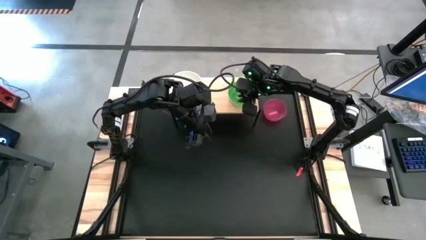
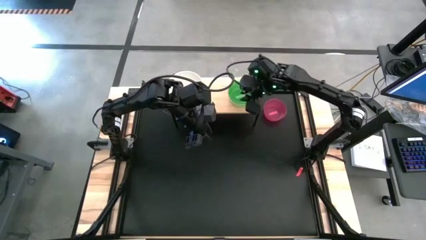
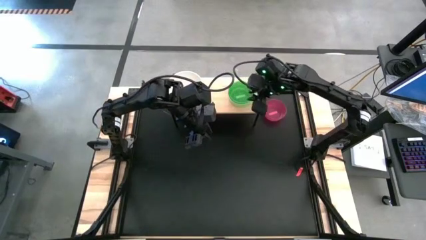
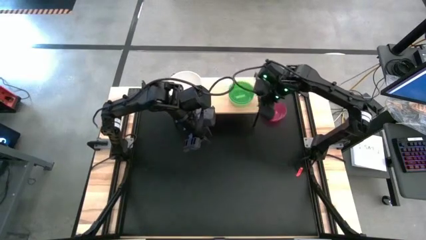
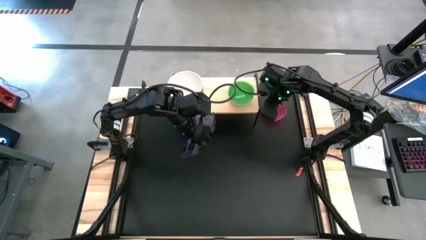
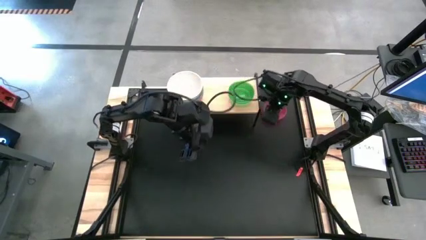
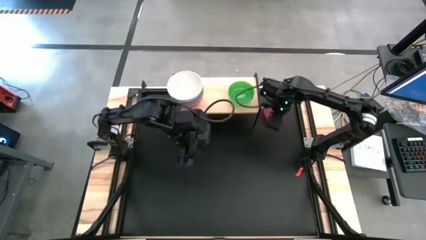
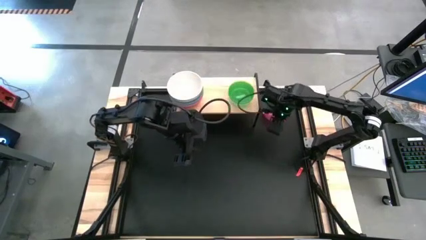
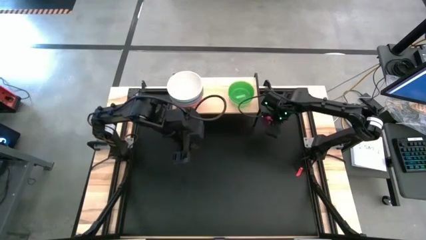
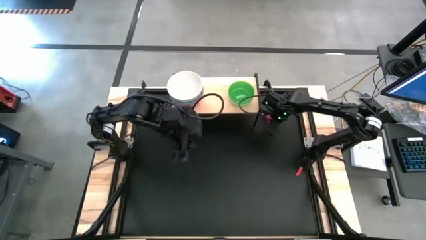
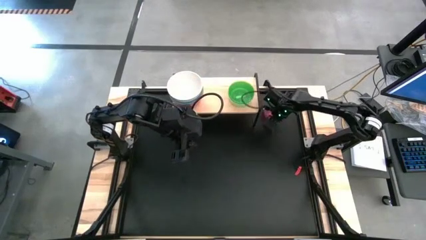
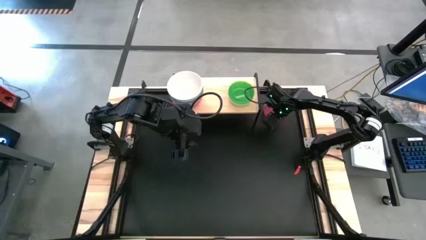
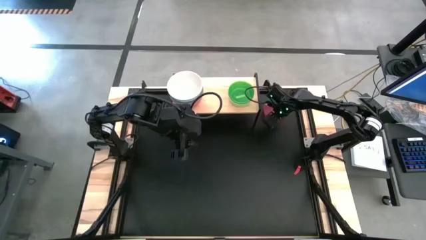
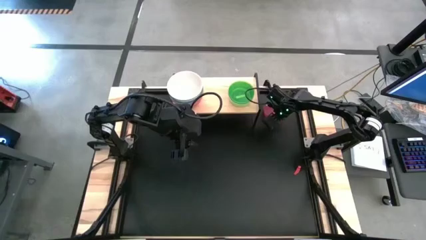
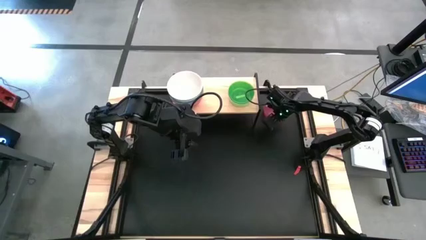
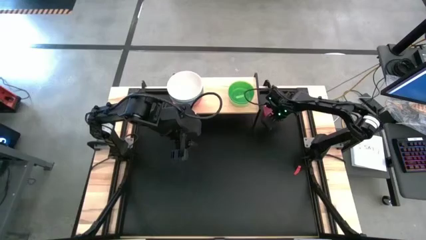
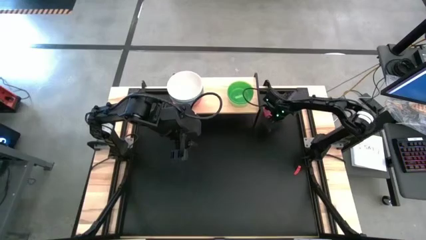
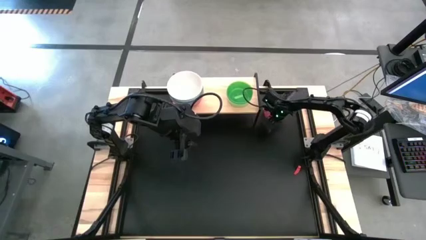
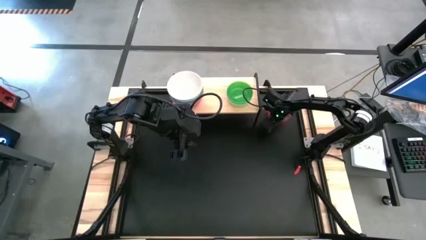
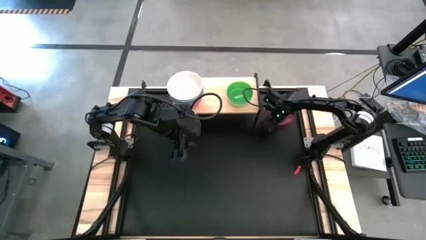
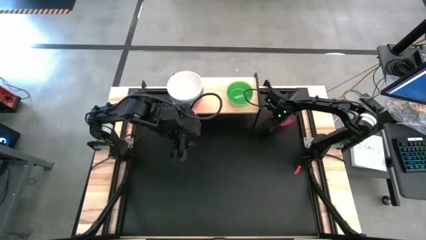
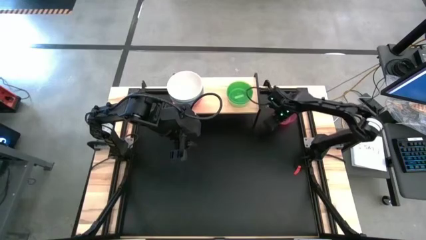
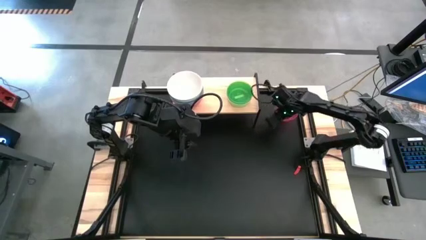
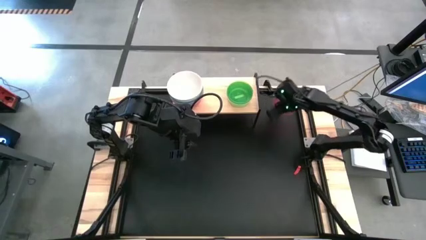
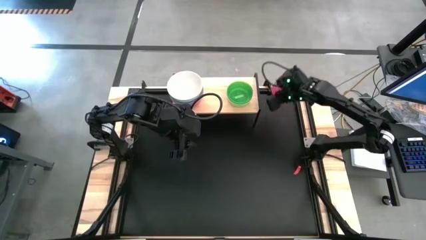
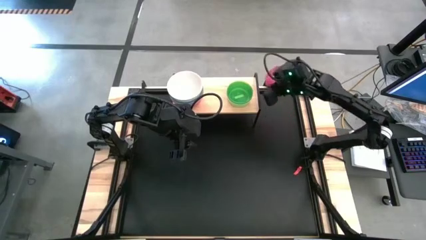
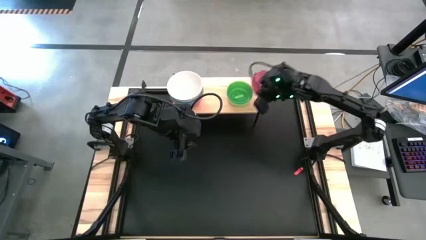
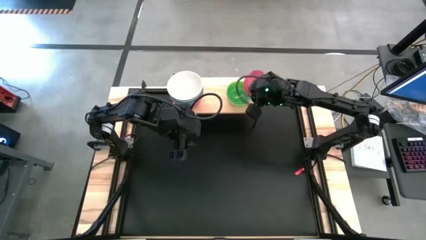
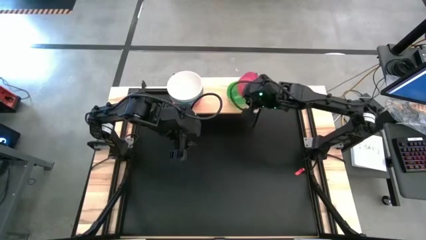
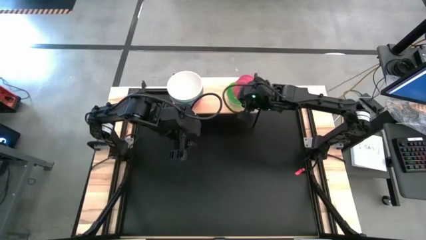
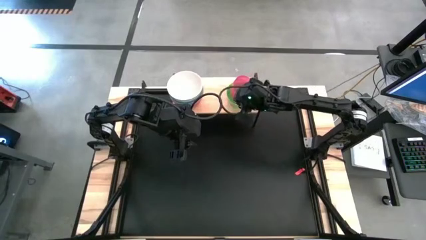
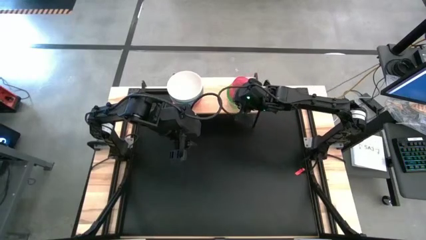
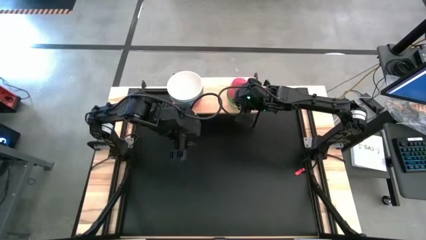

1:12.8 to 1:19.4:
Task: Place and stack bowls onto a shelf
Stack the pink bowl on top of the green bowl on the shelf

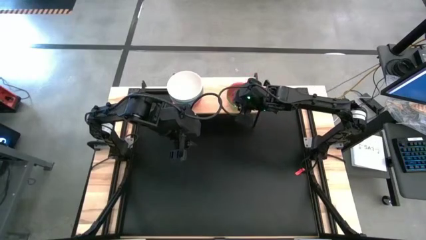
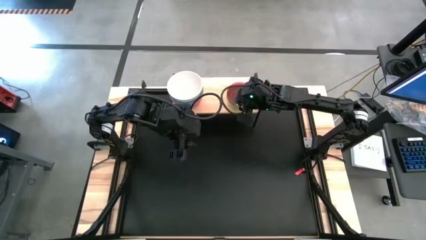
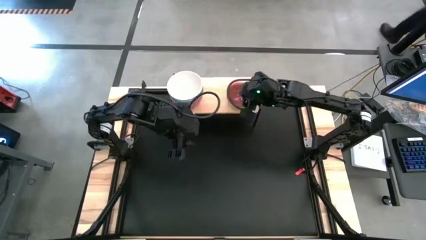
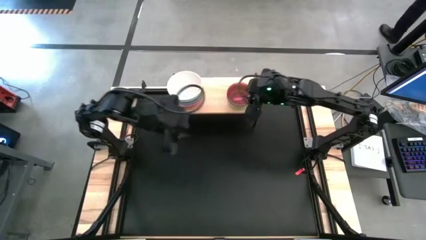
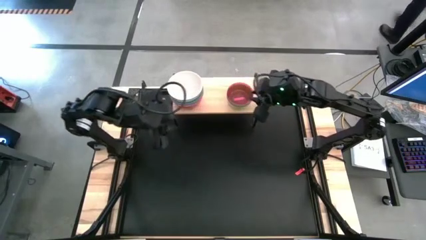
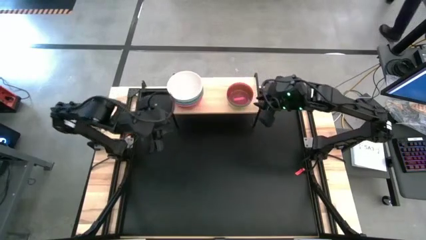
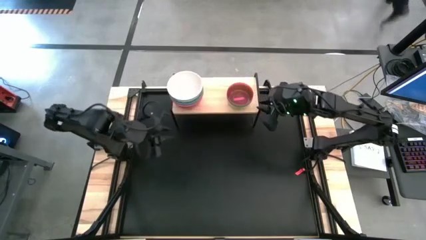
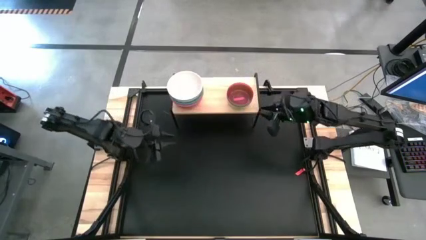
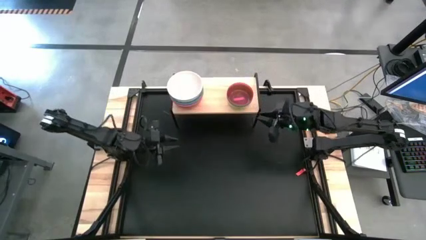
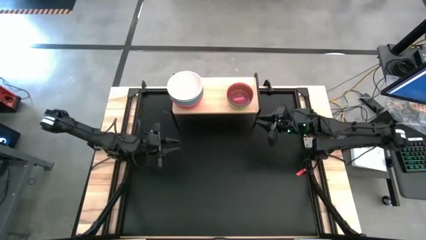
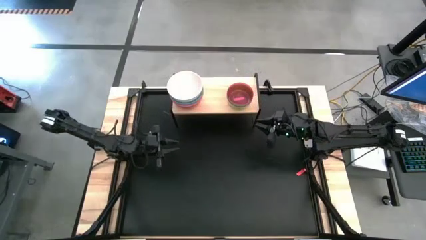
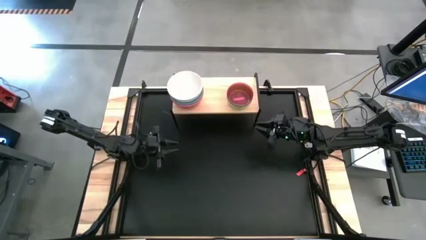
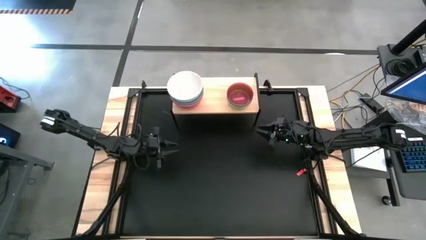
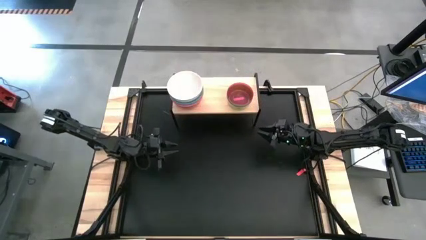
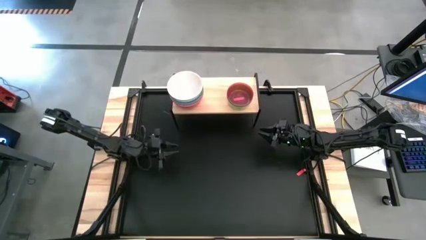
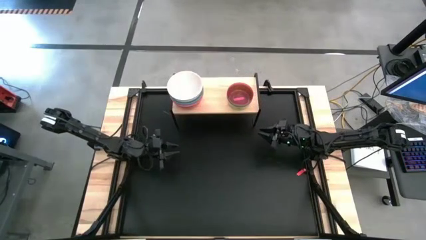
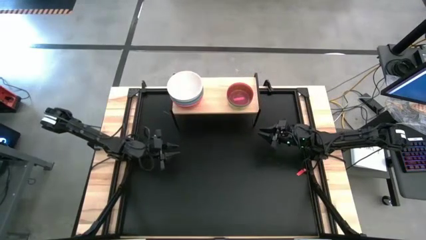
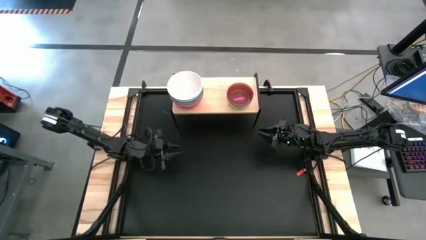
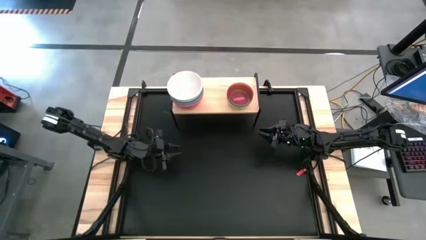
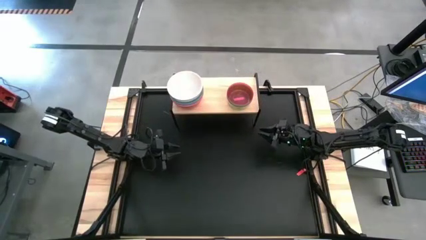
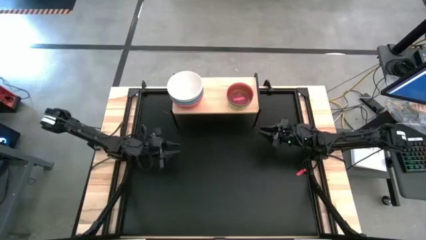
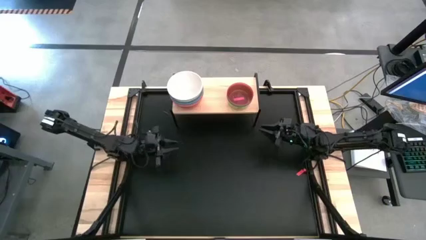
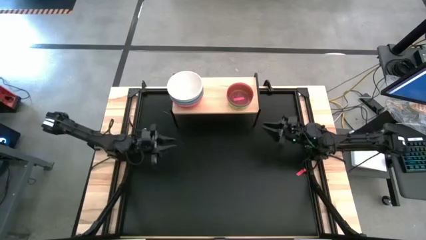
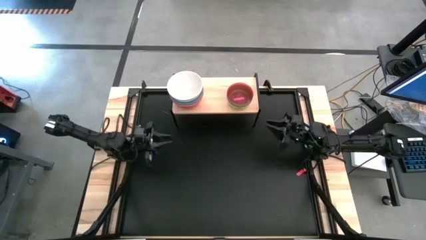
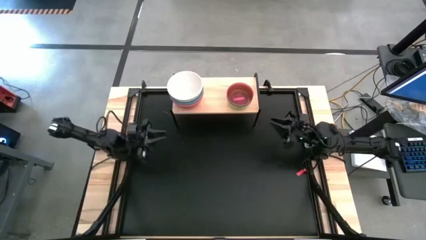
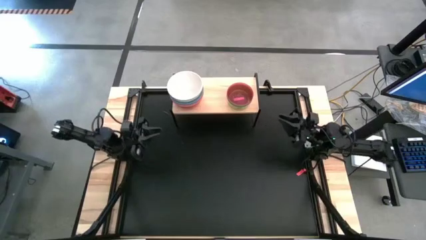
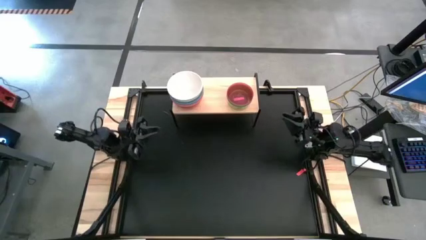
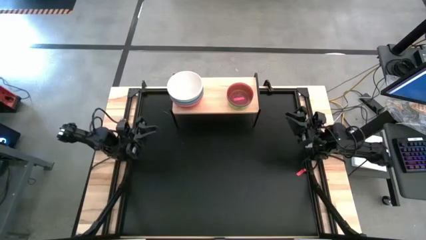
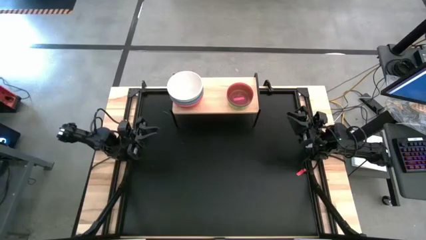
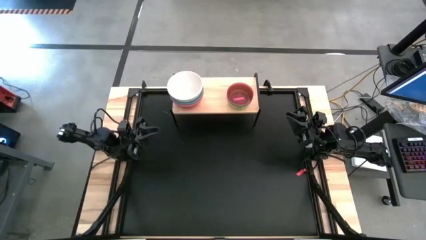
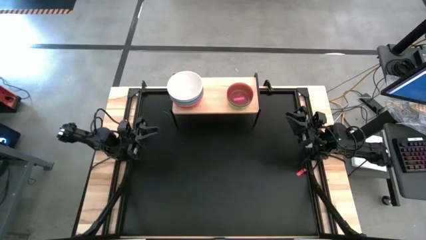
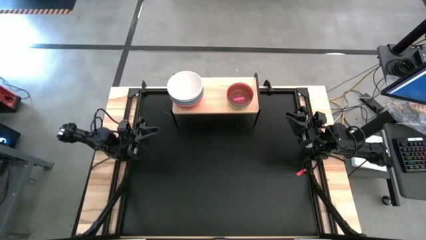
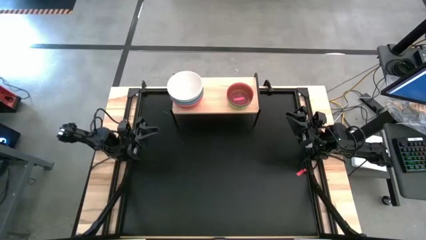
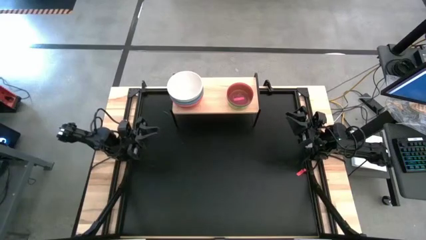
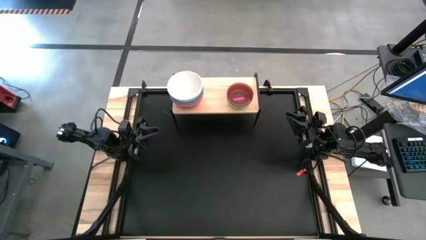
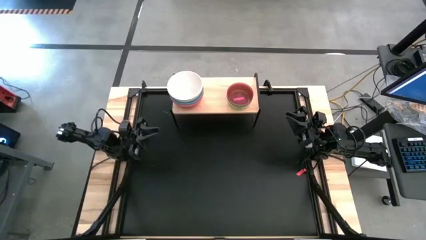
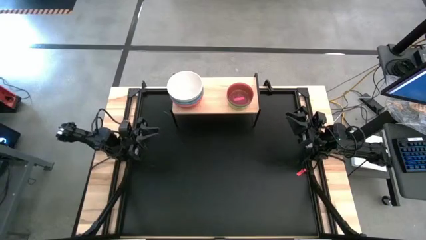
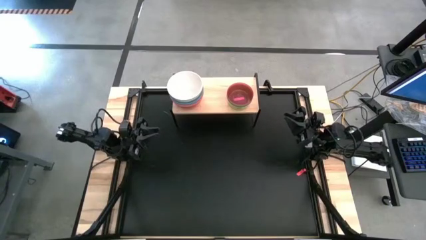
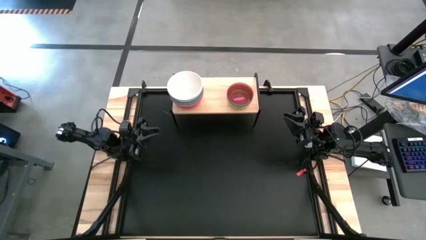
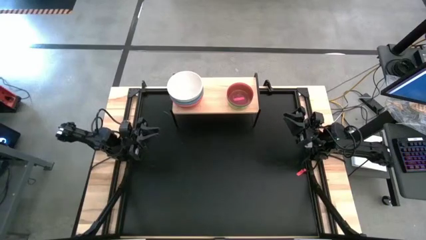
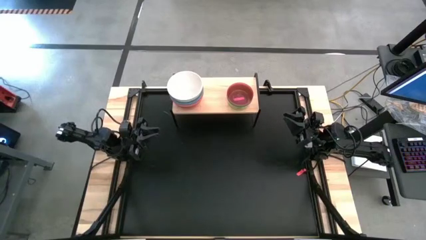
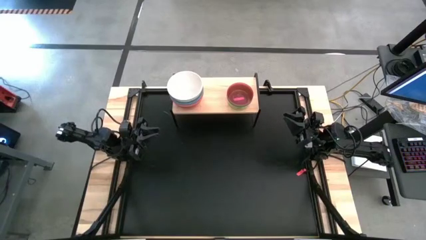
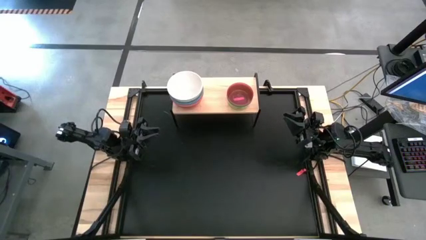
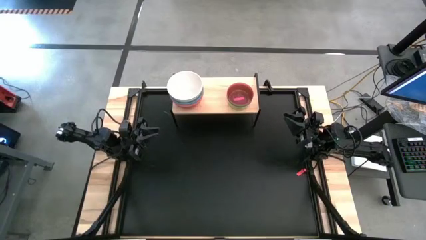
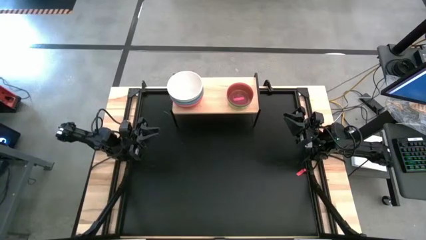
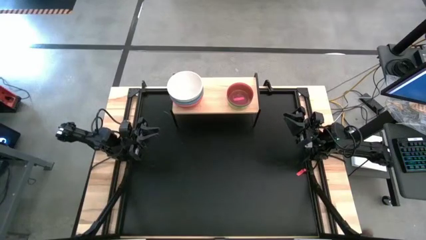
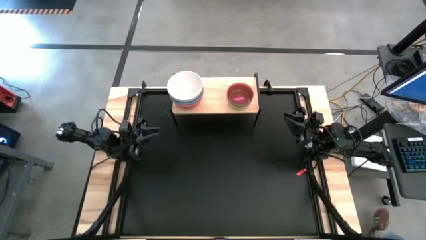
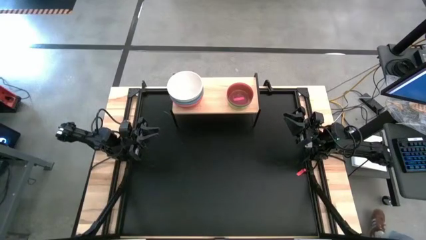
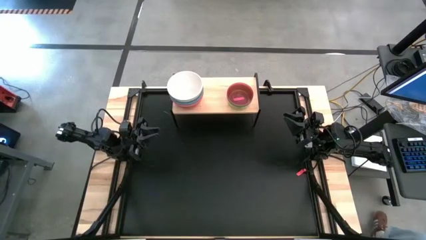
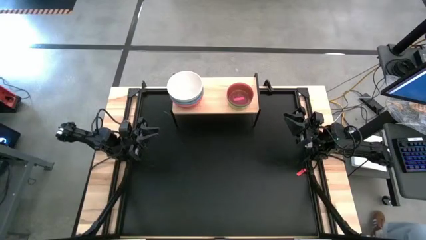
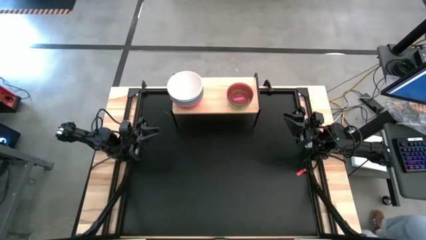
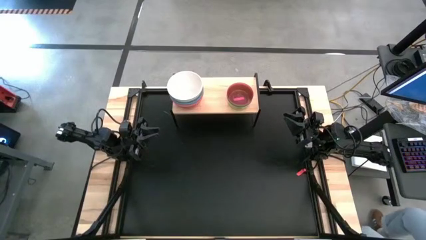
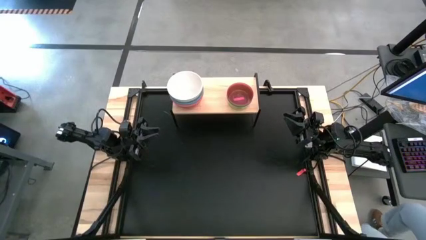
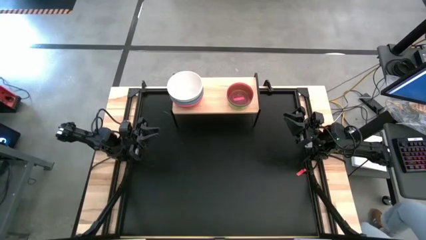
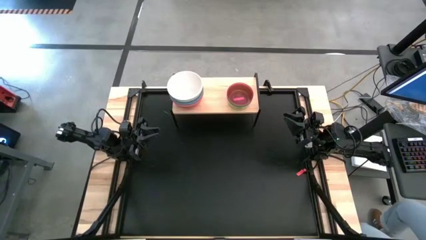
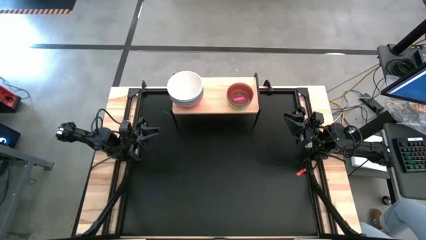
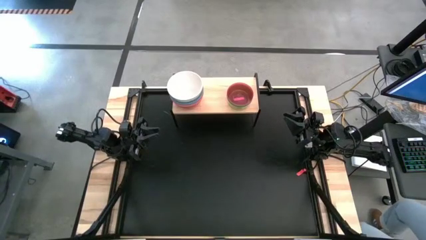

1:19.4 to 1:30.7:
Return to Home Position
